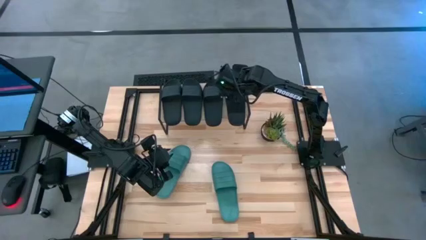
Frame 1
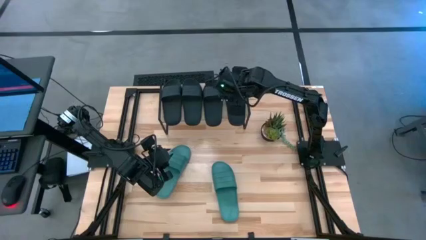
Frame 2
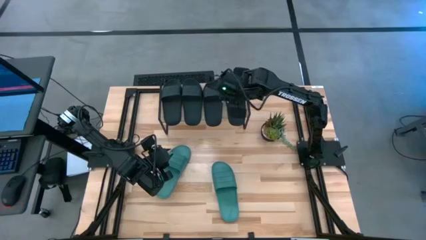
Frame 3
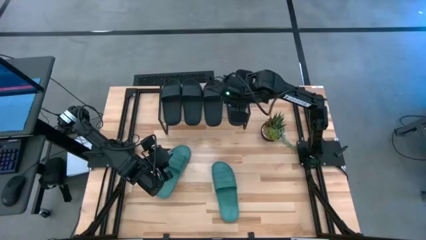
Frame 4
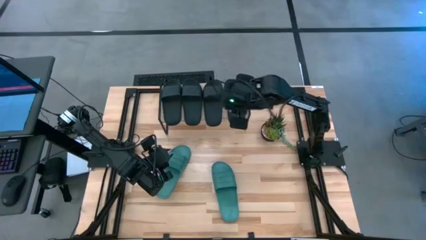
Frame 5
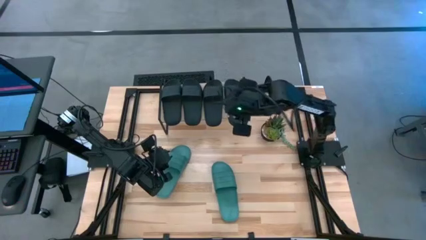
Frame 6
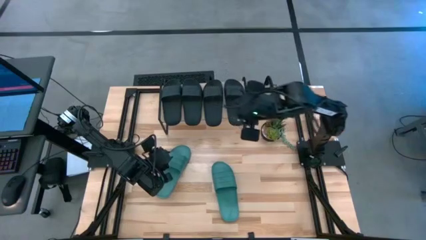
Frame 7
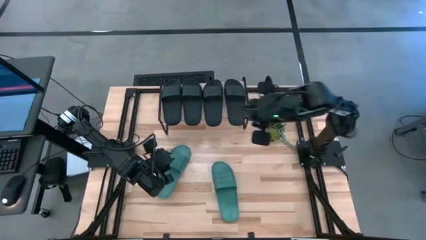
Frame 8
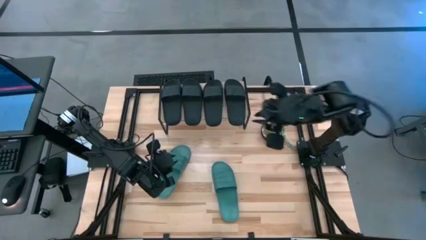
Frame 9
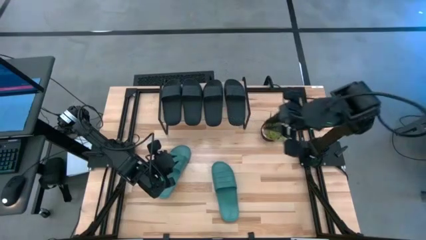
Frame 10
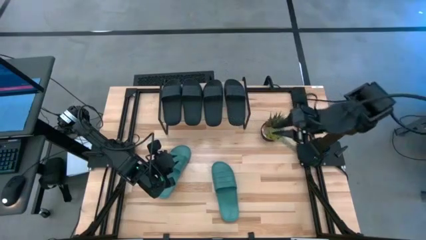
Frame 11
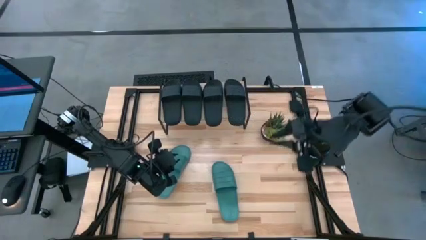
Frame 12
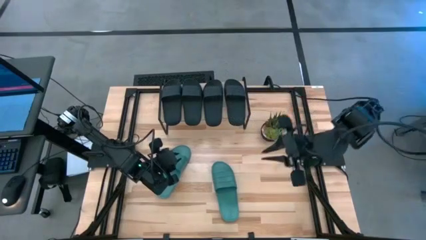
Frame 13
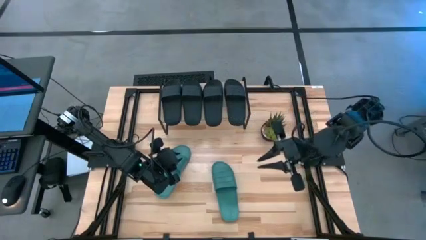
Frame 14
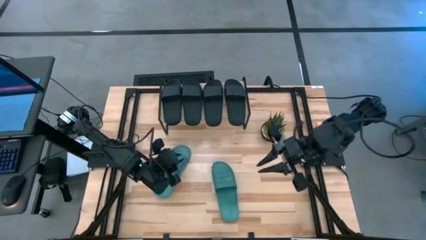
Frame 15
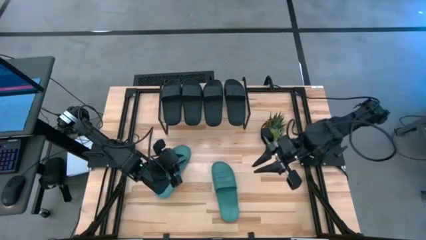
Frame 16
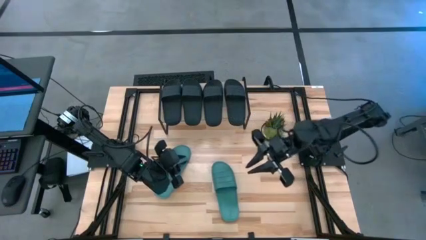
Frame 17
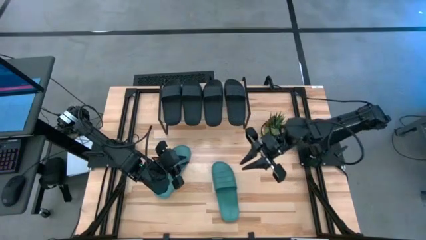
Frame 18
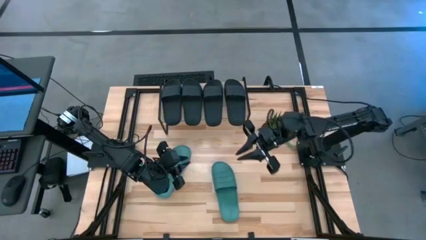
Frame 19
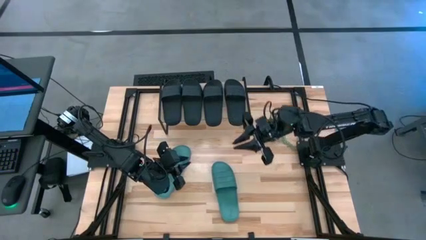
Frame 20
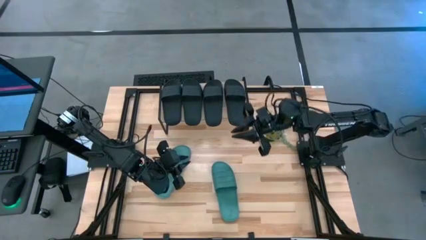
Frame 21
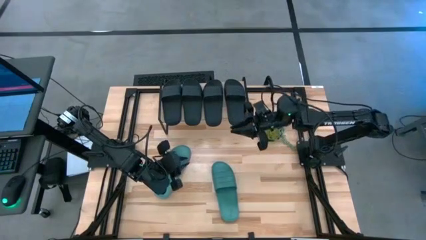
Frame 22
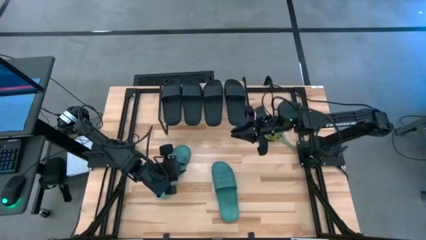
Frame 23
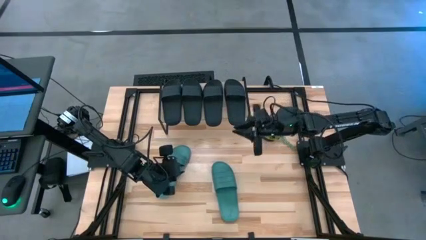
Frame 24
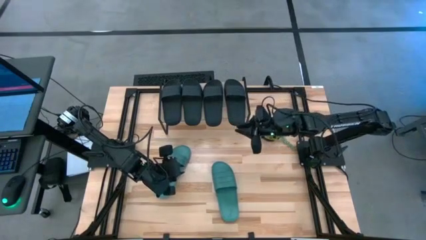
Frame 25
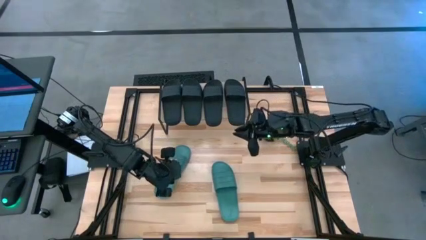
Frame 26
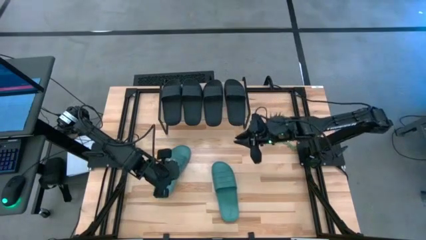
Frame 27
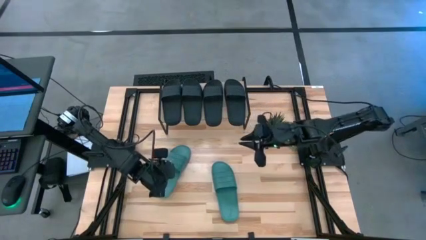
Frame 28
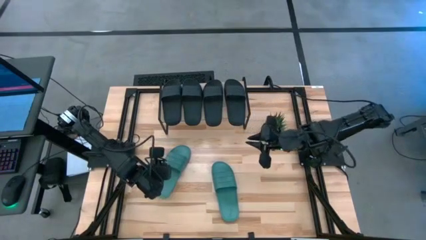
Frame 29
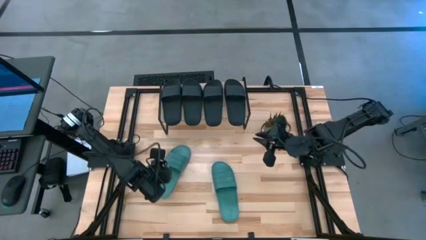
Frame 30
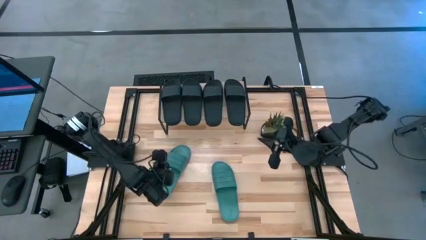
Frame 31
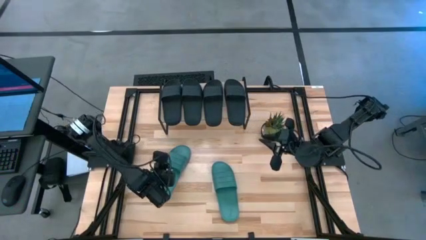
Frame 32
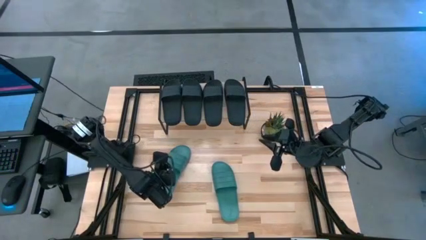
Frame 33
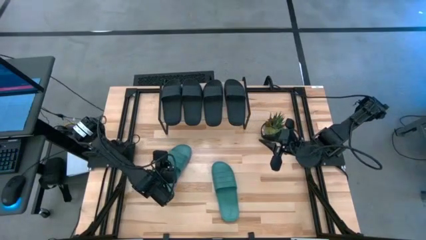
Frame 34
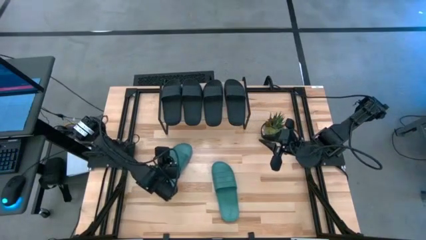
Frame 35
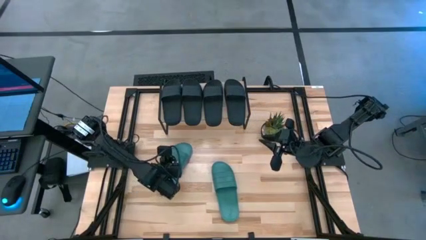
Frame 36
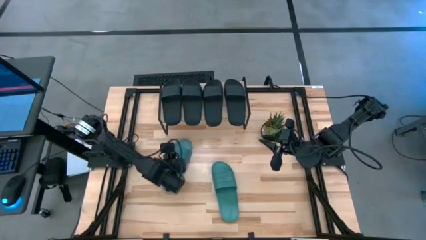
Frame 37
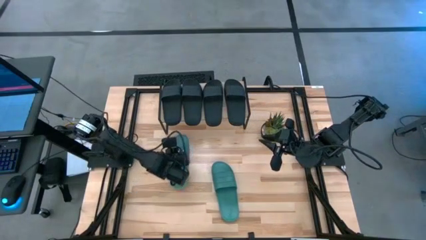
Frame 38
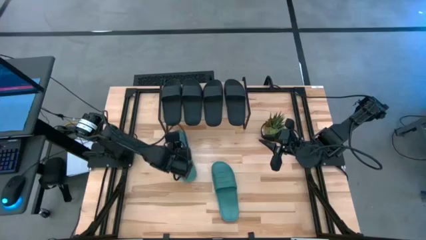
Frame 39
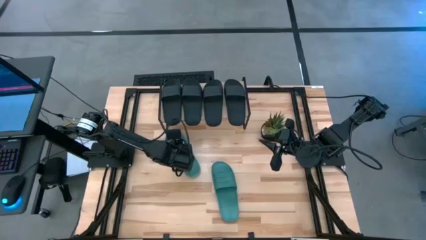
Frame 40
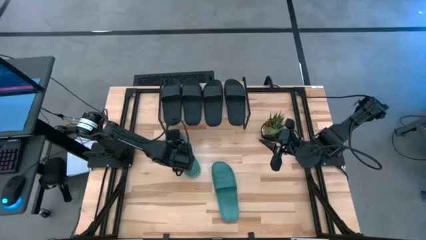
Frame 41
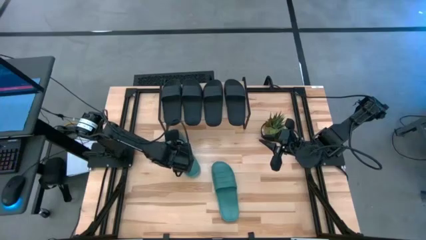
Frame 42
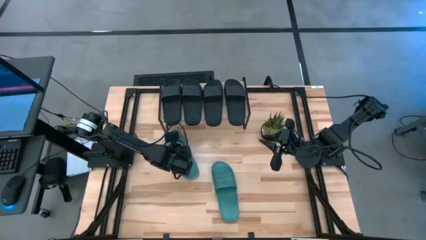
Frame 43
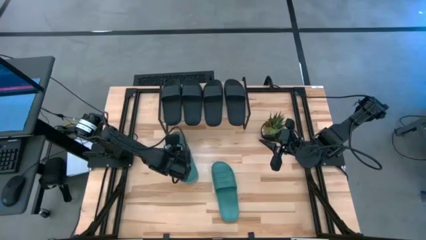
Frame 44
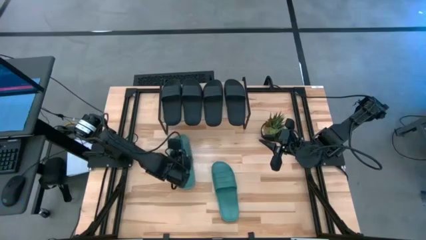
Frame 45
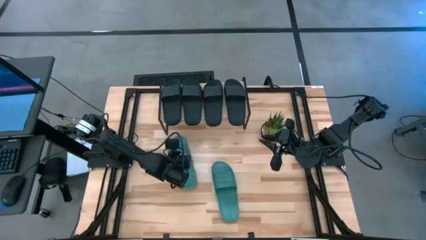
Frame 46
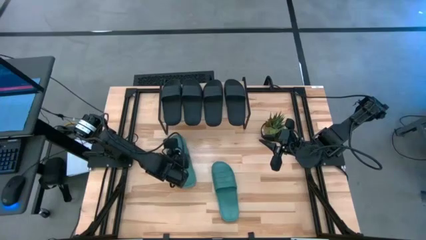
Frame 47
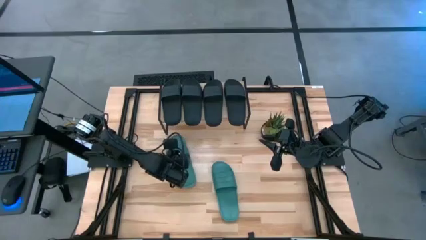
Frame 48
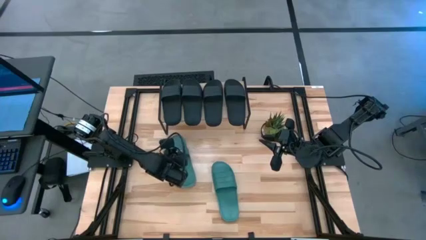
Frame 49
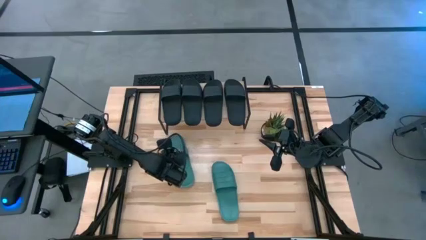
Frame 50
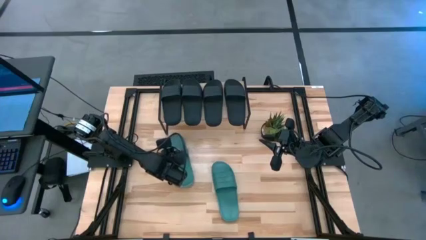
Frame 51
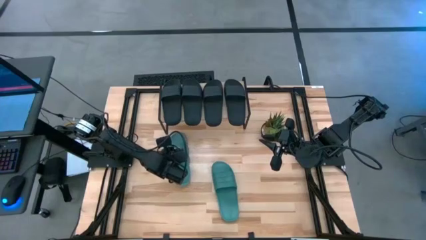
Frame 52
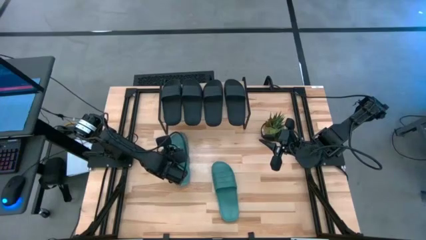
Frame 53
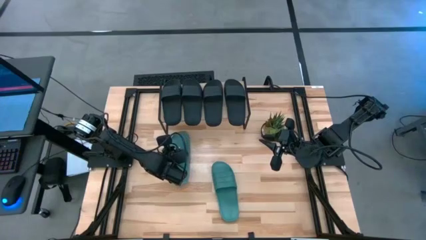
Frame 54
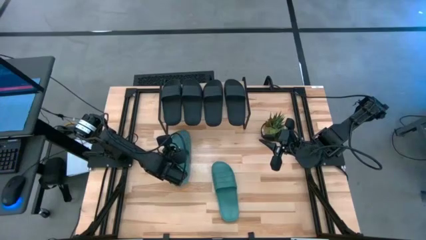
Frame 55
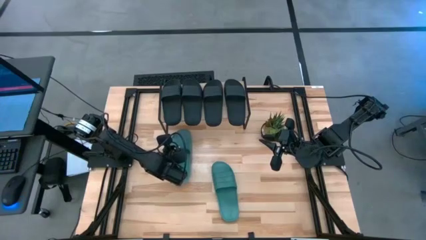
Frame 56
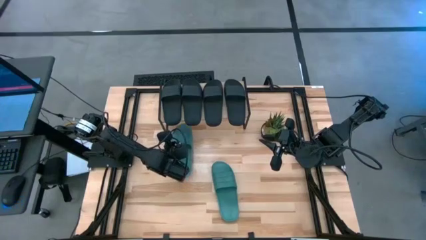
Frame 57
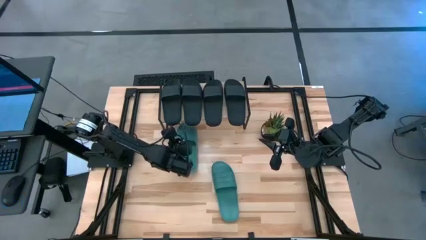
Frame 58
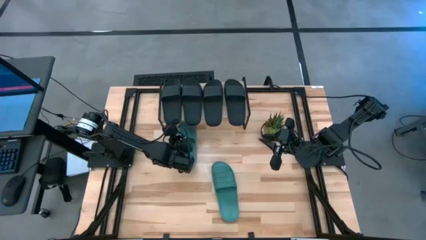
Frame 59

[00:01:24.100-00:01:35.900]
Task: Pick and place slides into the shelf
Put the green slide under the shelf

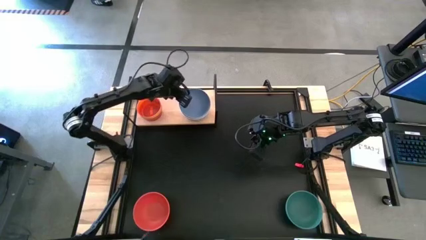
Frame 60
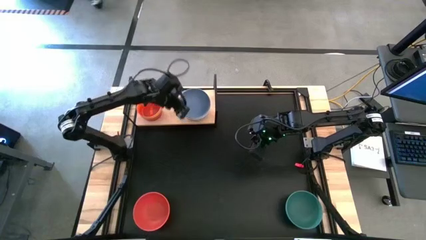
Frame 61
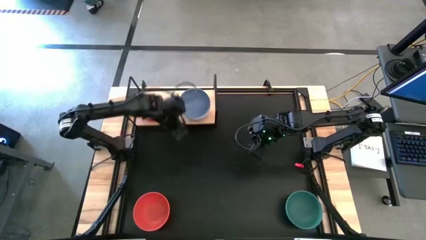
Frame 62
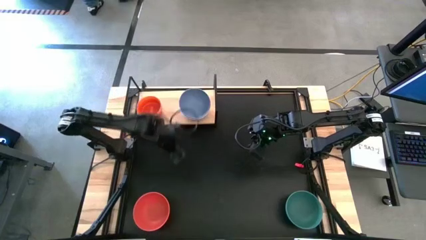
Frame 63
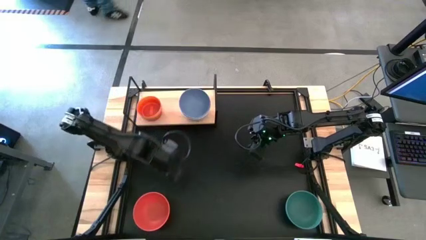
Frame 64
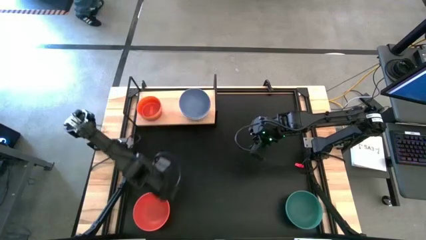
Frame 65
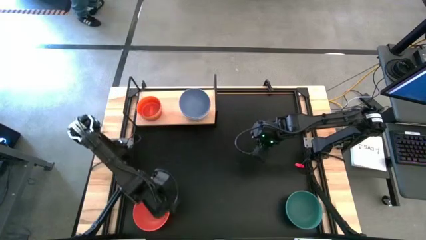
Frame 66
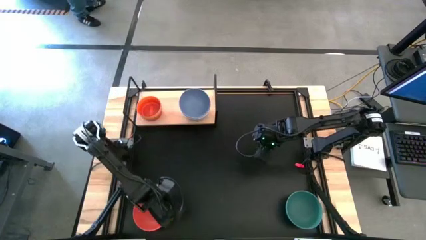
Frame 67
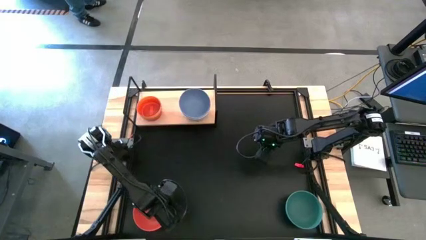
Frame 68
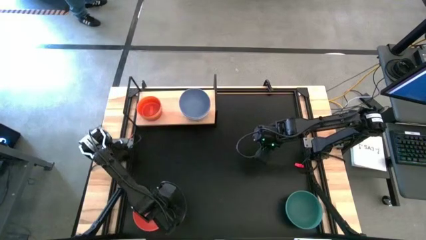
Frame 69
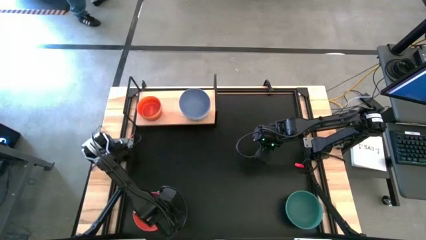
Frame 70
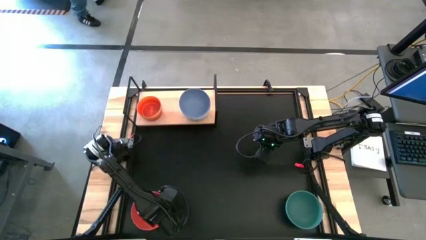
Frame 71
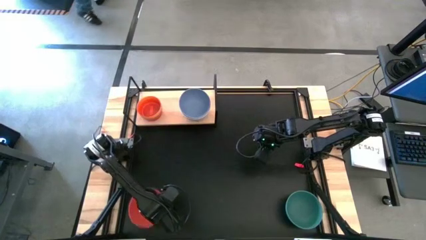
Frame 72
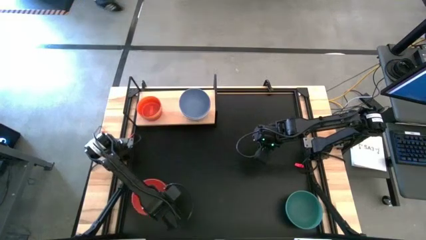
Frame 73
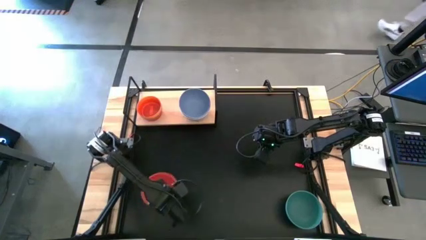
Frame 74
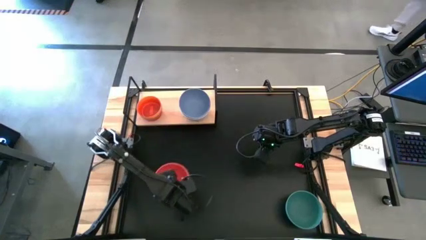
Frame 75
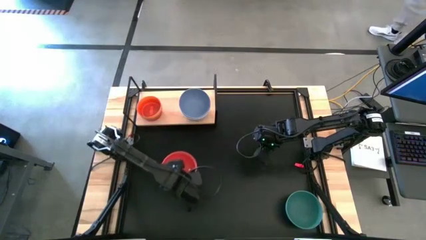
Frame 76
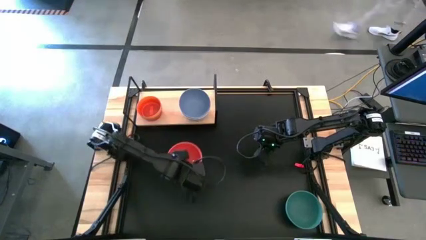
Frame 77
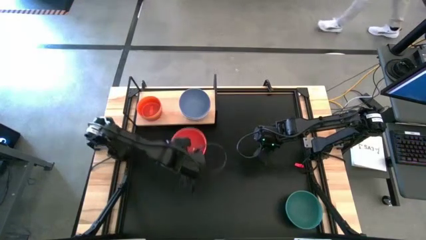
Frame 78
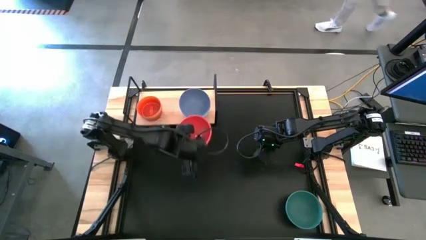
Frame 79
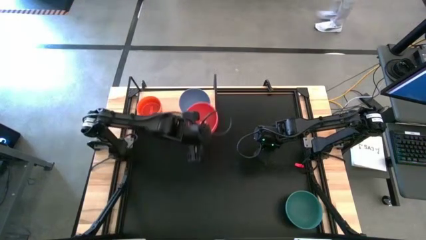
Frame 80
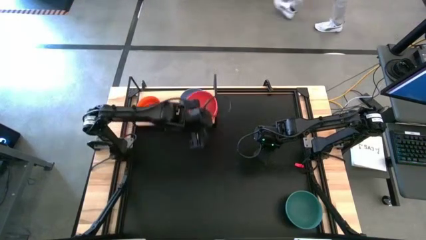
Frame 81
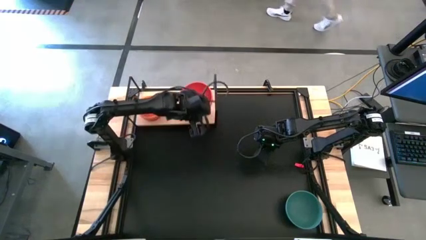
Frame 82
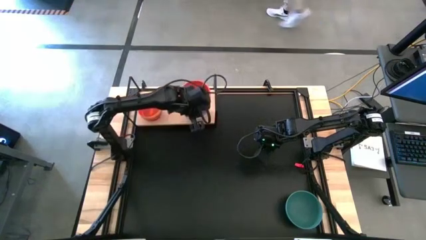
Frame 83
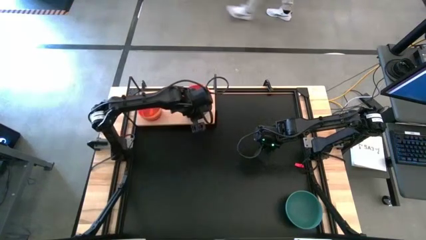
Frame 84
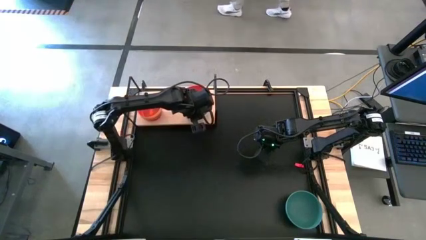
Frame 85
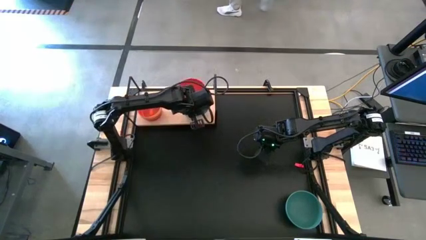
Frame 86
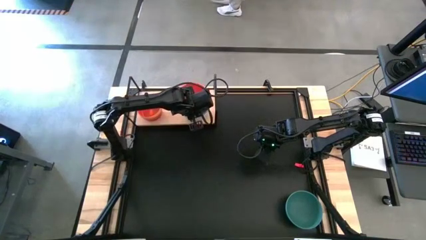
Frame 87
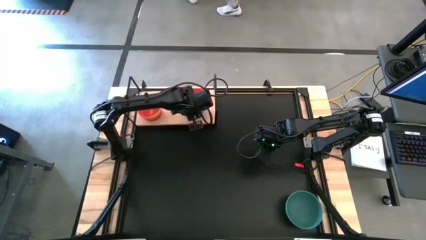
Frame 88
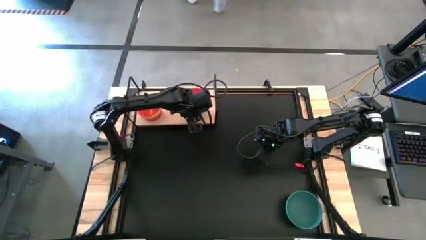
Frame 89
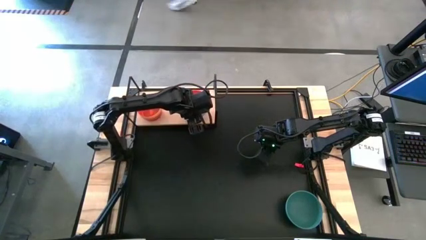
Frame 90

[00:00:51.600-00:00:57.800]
Task: Place and stack bowls onto a shelf
Stack the orange bowl on top of the blue bowl on the shelf
